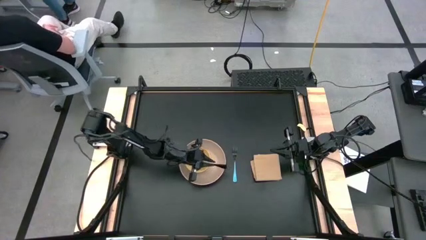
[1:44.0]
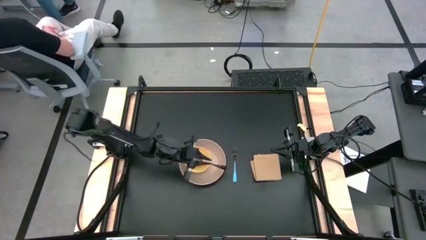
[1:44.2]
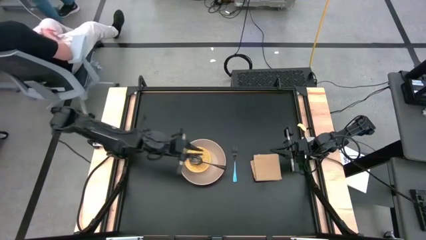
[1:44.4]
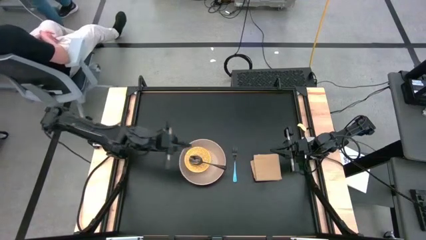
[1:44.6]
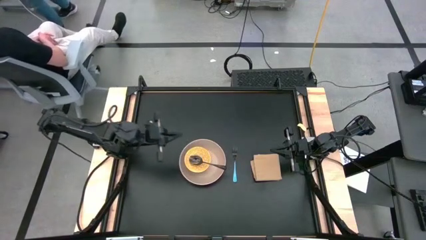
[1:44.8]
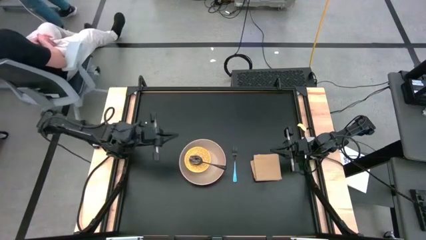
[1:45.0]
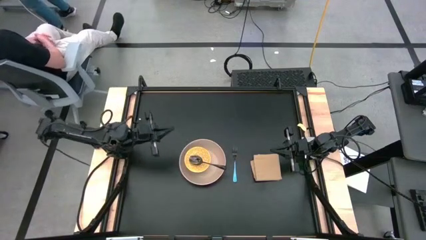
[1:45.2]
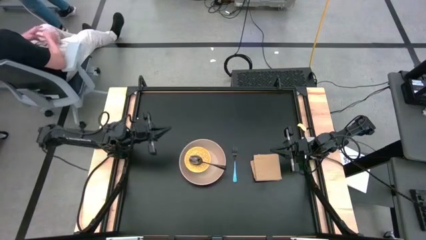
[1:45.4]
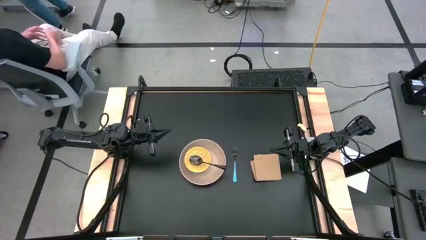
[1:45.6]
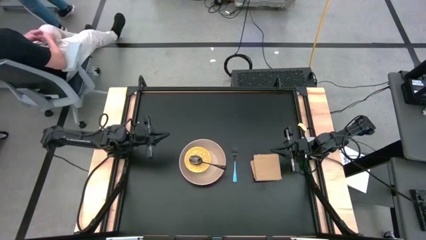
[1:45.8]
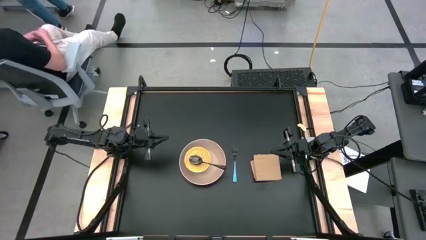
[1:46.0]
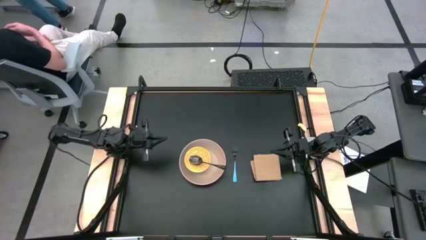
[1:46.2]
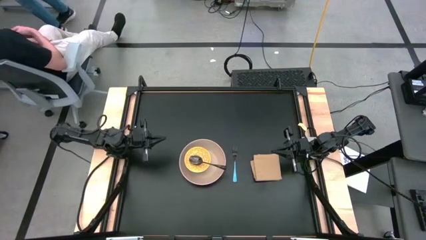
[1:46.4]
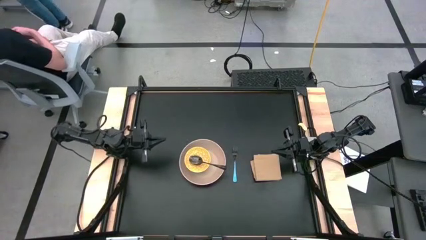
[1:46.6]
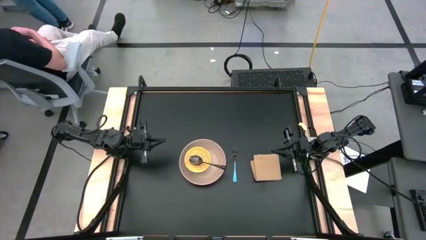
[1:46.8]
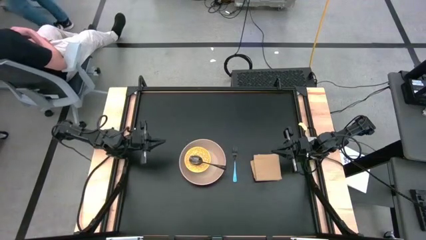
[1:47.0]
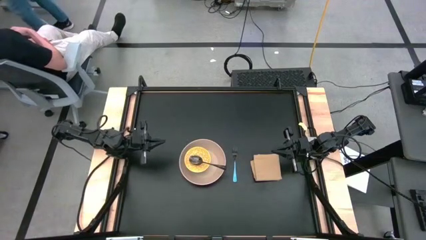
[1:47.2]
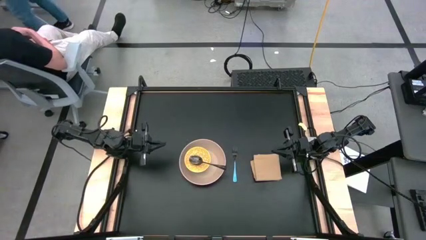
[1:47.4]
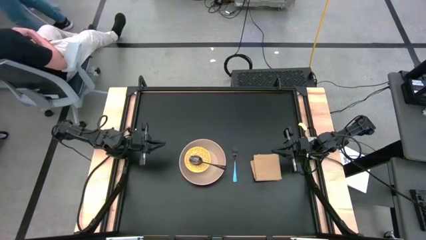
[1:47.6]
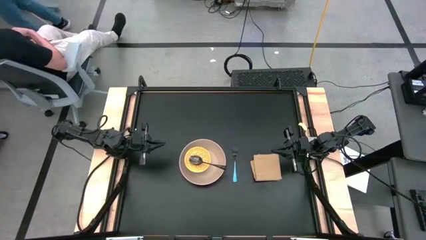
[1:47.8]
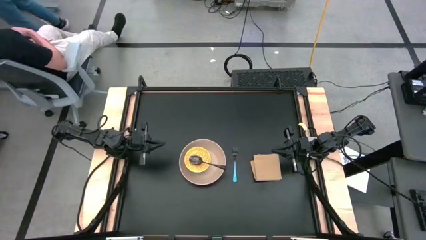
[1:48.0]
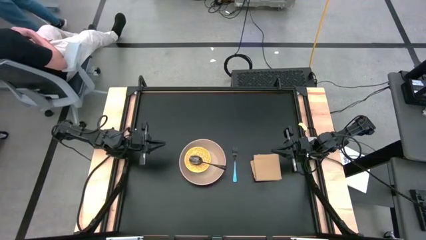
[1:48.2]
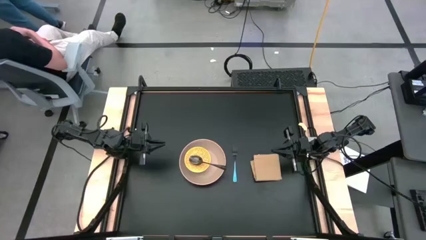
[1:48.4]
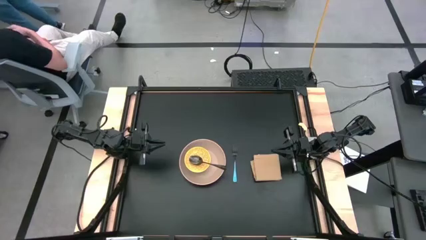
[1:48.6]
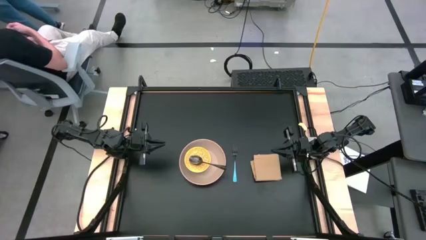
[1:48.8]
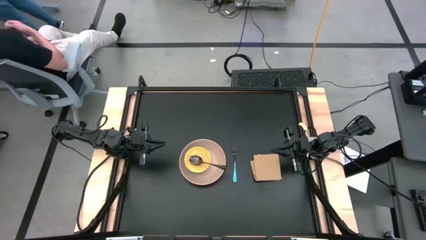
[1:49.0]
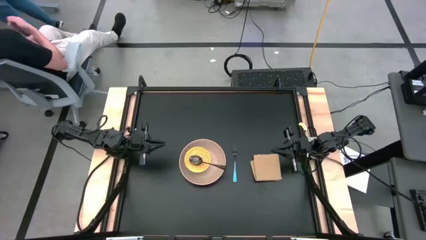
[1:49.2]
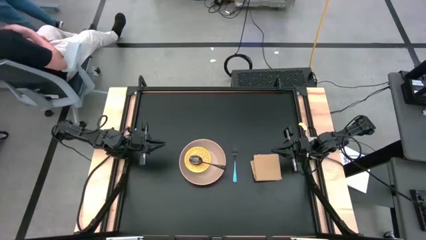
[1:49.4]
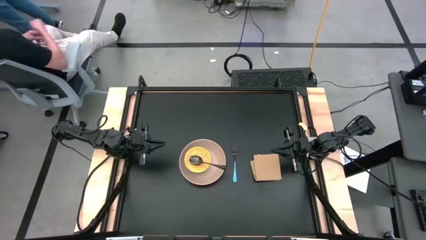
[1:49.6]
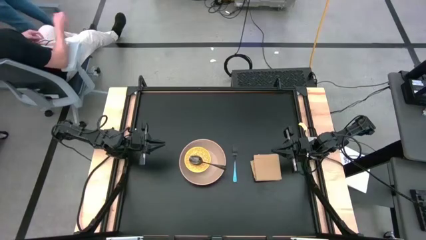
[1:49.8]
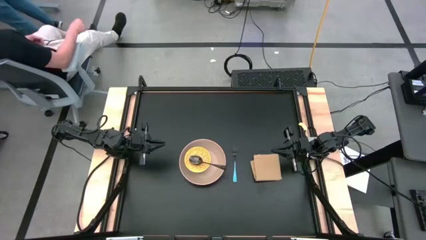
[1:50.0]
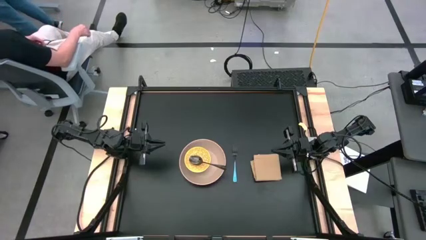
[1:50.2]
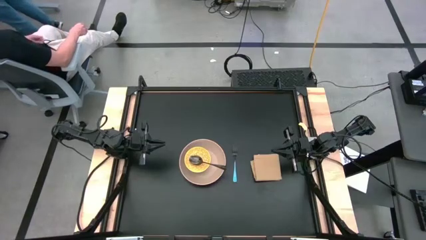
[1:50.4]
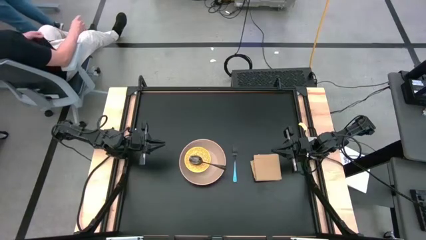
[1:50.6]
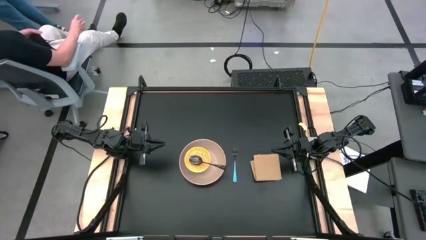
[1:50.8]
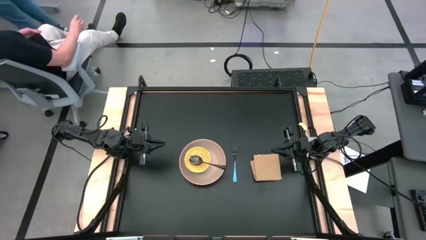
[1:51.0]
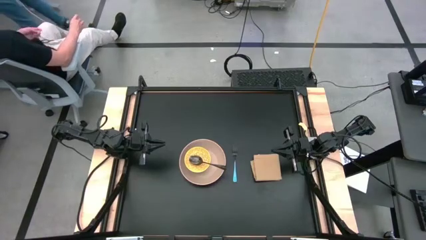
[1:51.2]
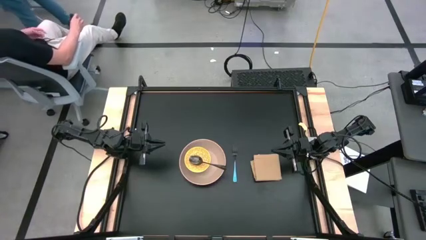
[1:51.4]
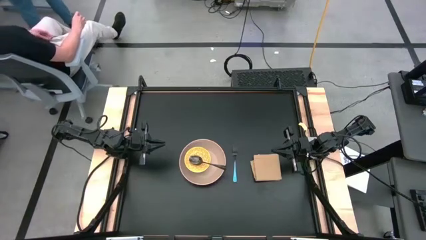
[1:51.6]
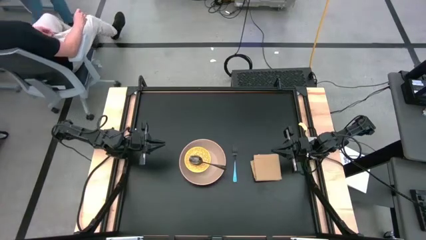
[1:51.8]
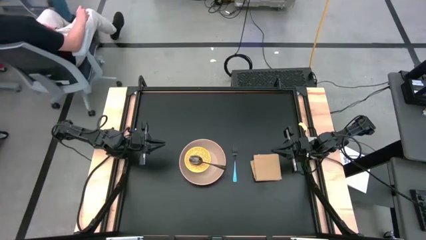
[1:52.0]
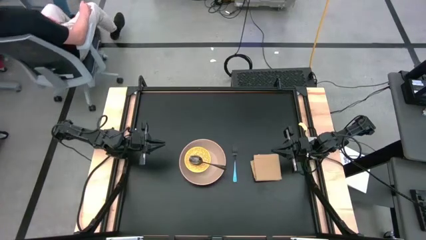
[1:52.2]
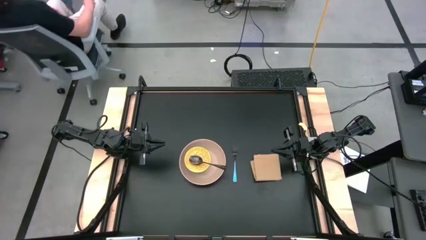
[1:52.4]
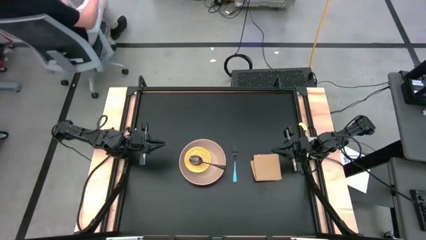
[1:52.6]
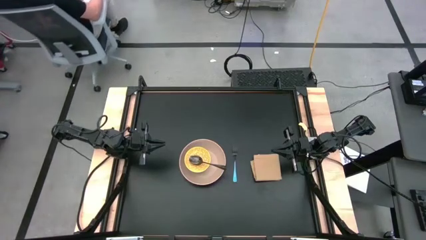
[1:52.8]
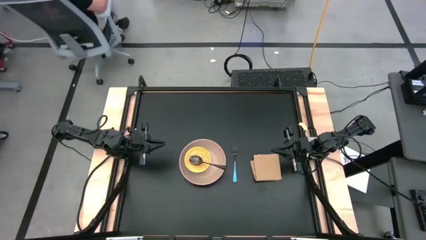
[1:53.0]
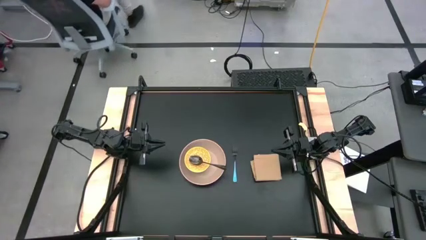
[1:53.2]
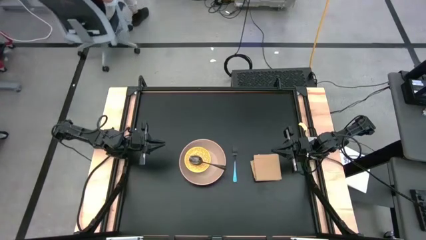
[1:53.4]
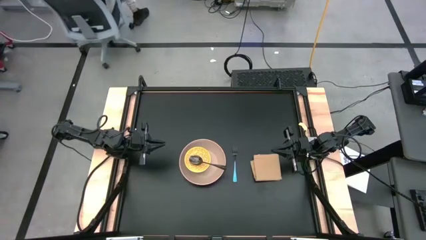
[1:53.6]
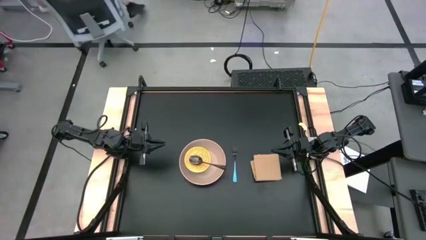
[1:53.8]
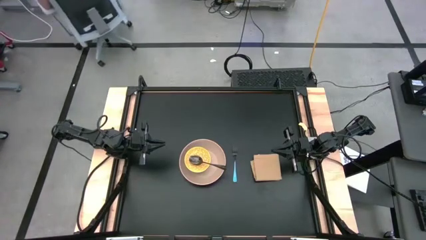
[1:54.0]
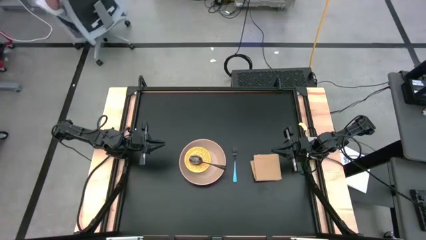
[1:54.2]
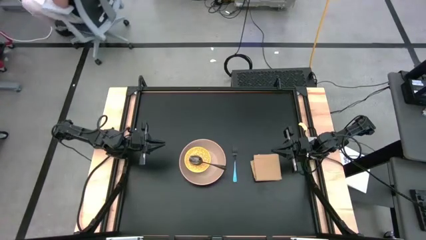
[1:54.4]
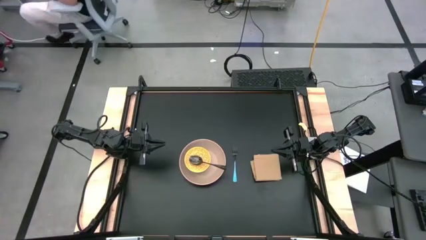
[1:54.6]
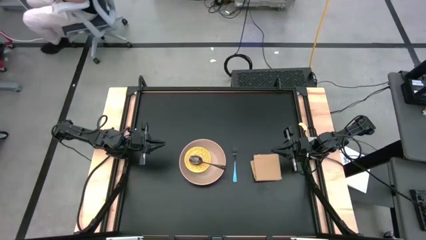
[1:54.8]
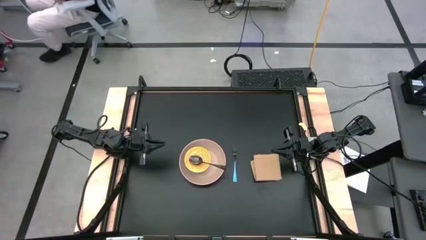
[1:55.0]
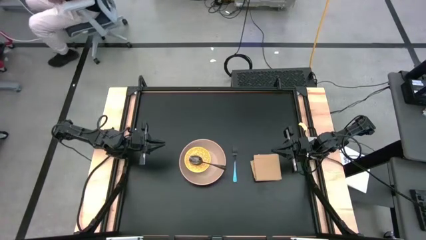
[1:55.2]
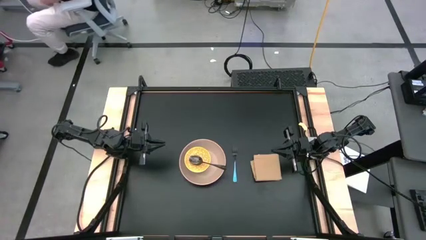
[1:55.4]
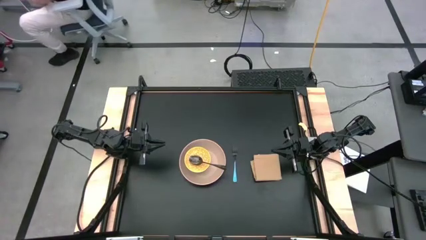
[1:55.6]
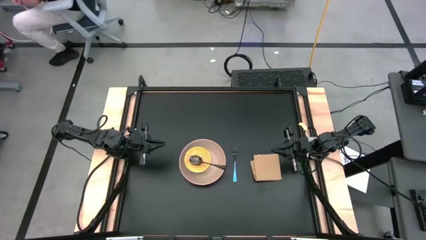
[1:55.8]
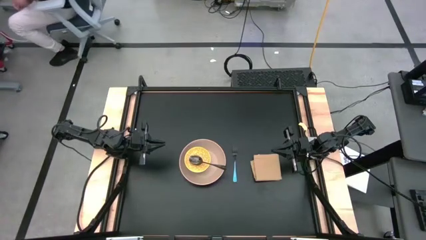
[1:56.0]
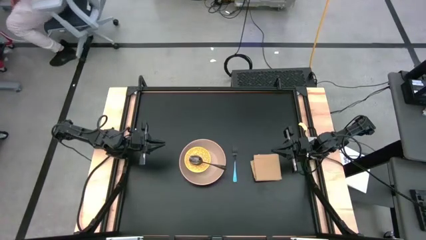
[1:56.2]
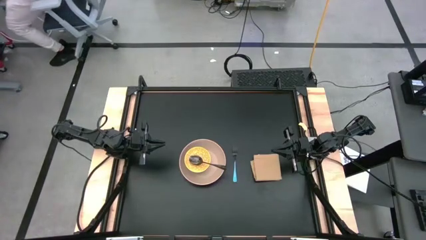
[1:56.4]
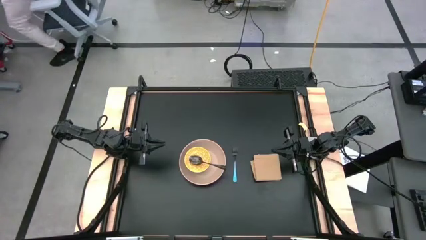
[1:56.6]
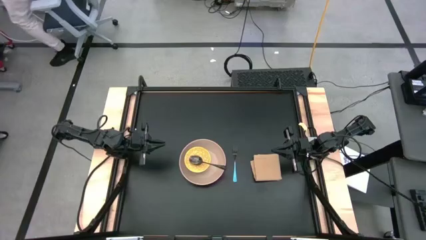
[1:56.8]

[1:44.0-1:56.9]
Task: Set table place
Return to Home Position
